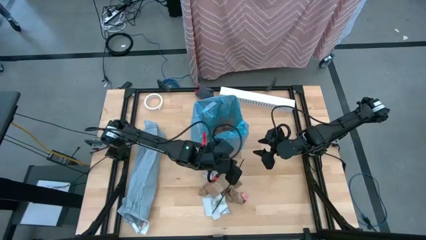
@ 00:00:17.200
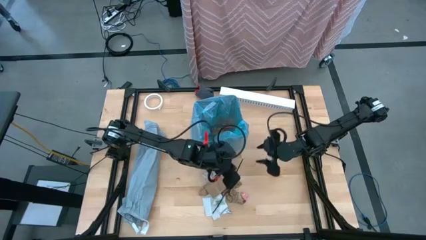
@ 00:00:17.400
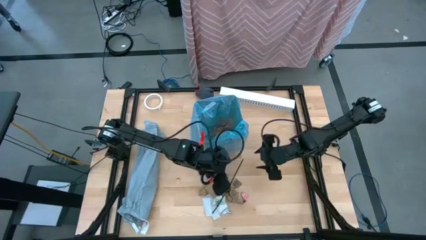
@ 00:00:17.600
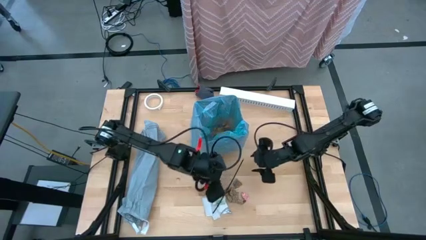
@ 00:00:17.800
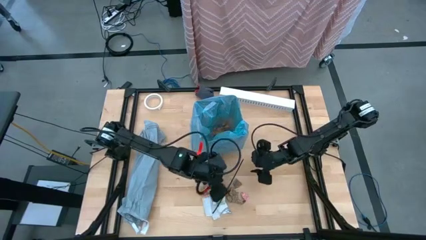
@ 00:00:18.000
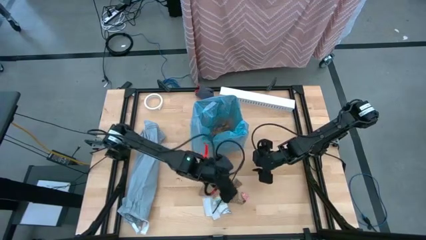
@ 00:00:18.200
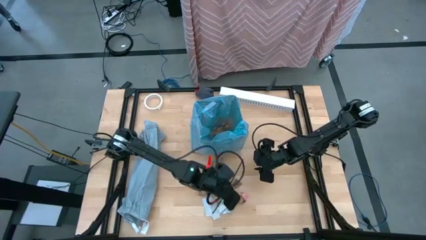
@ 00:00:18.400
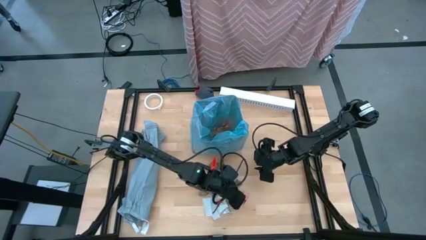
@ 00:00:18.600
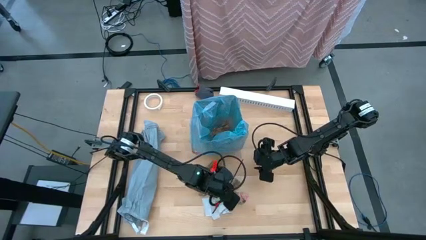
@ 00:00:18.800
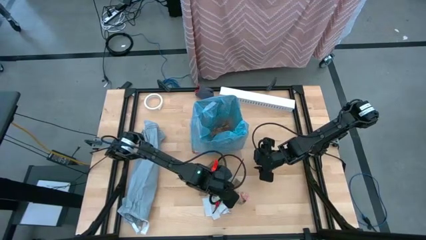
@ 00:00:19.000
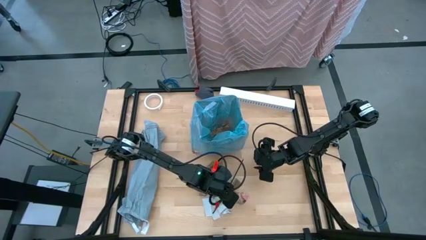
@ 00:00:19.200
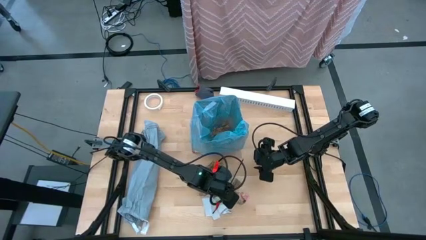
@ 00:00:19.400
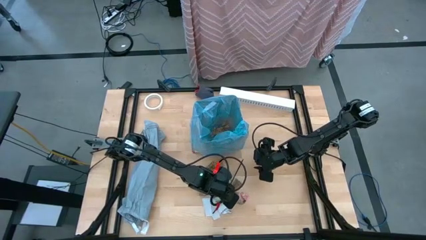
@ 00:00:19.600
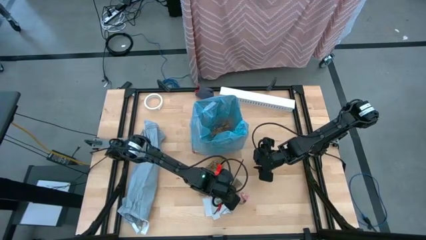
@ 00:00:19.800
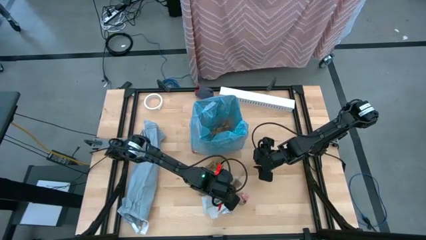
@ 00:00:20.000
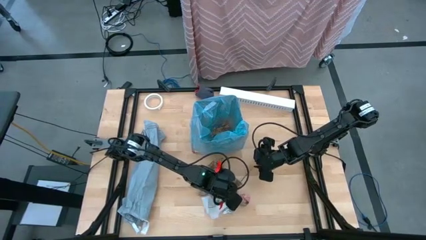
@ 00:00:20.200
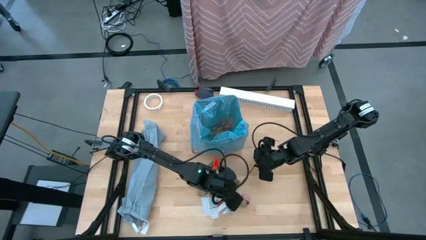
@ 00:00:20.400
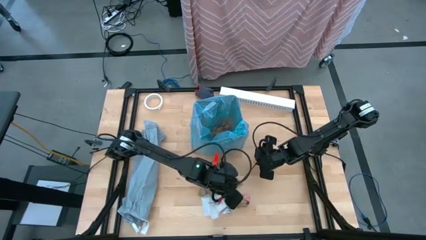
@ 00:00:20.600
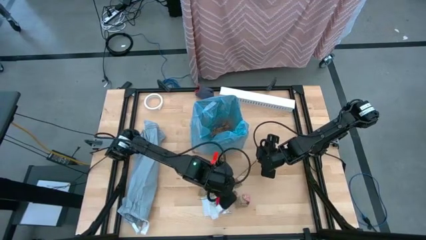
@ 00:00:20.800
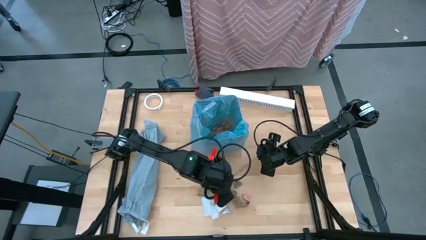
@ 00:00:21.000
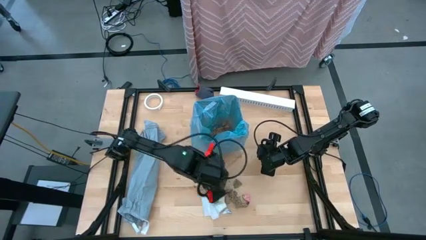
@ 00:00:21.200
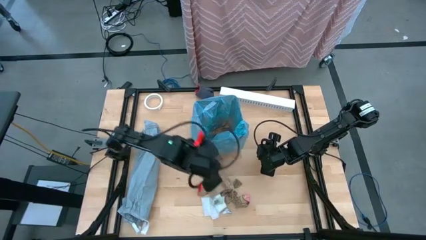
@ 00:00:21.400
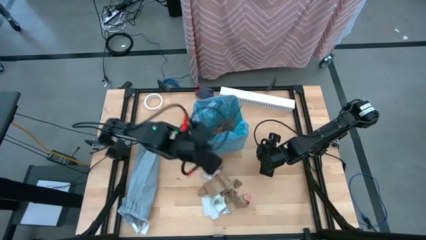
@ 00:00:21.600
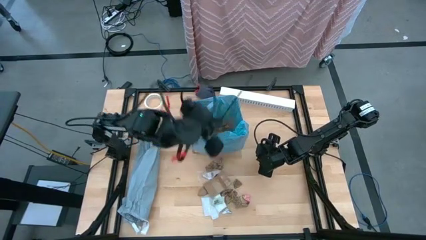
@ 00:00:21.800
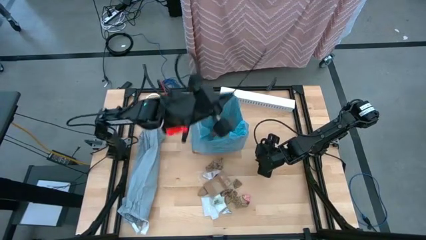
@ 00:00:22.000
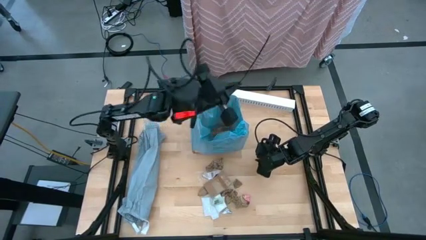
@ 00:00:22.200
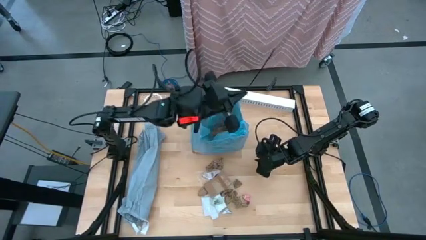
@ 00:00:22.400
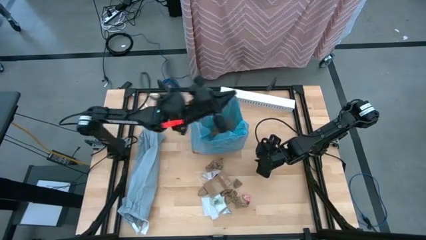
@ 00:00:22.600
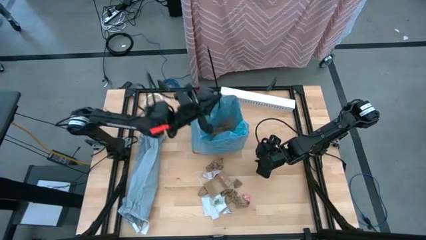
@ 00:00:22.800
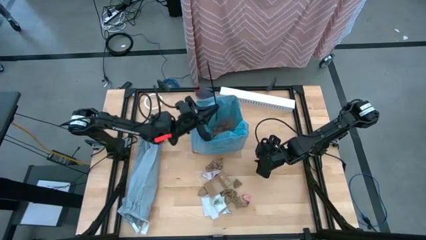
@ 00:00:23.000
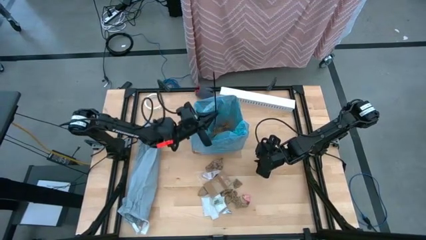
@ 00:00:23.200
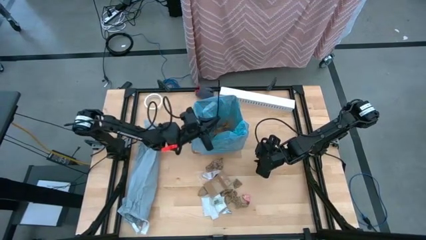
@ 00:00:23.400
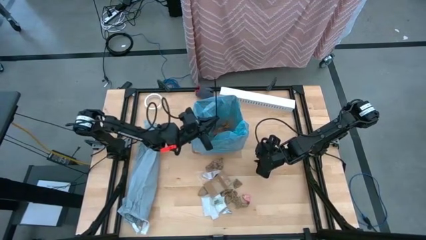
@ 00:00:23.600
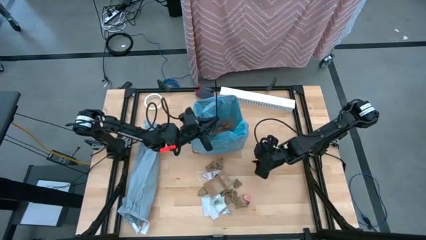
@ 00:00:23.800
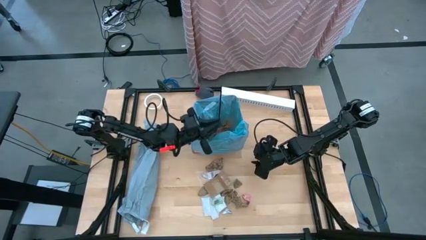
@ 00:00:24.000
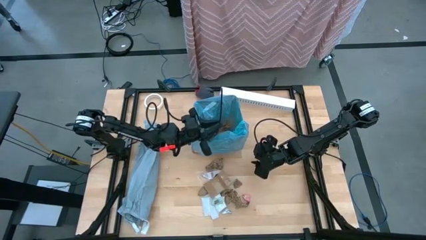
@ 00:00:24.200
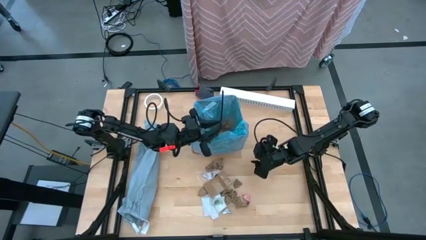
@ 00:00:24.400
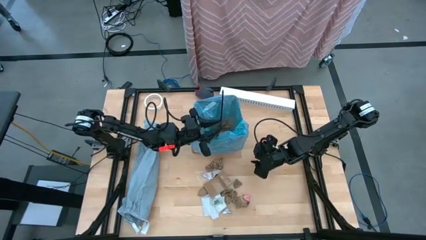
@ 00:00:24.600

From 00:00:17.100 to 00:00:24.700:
Task: place trash/remove bag and relplace
Put the black zip tie into the trash bin

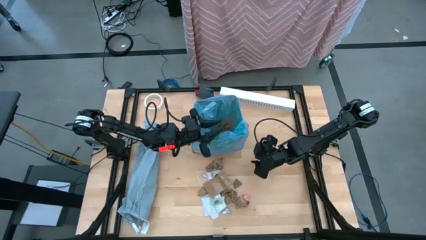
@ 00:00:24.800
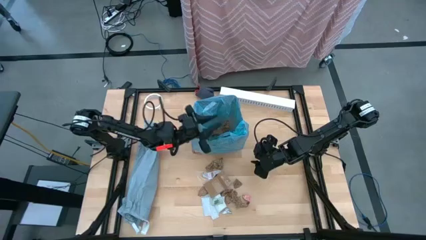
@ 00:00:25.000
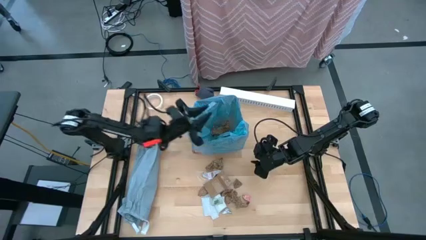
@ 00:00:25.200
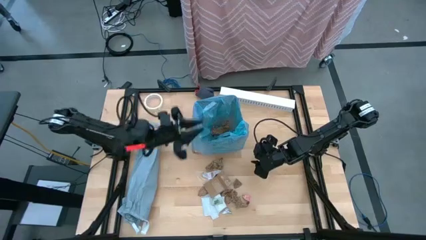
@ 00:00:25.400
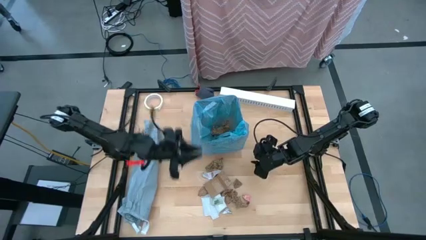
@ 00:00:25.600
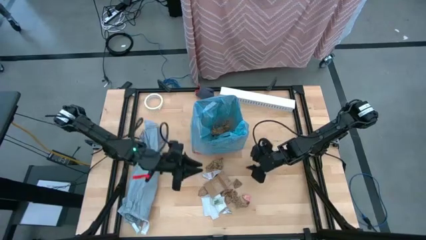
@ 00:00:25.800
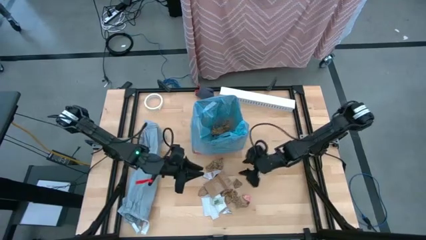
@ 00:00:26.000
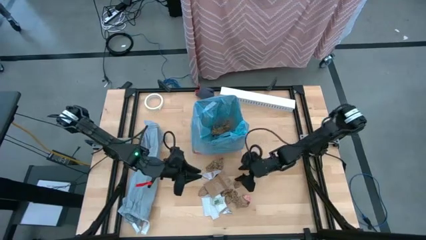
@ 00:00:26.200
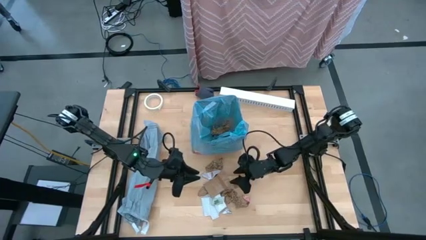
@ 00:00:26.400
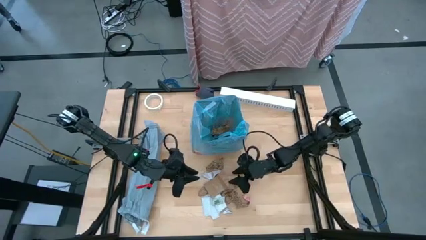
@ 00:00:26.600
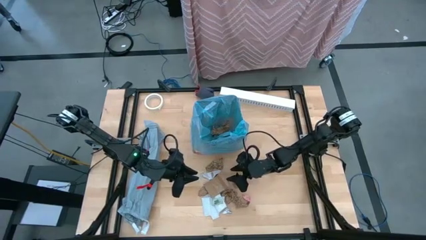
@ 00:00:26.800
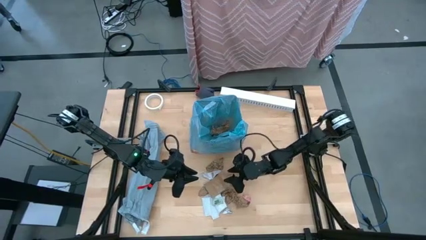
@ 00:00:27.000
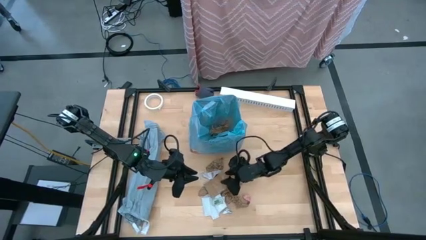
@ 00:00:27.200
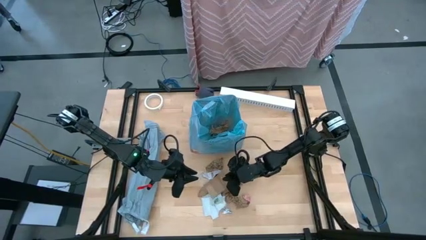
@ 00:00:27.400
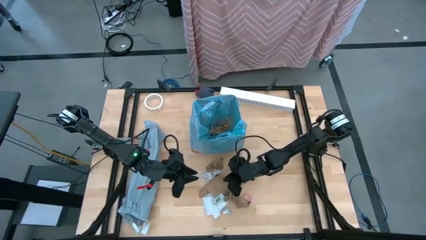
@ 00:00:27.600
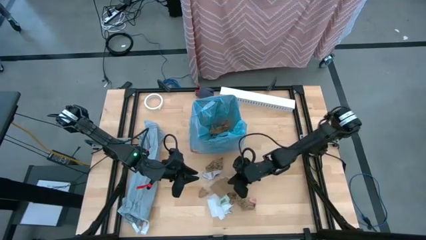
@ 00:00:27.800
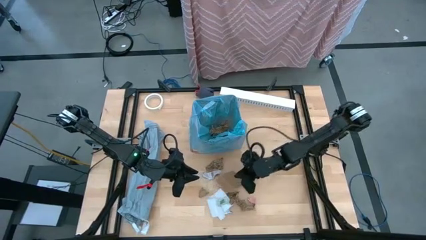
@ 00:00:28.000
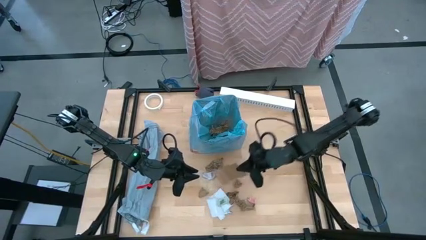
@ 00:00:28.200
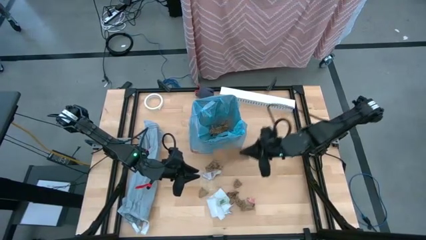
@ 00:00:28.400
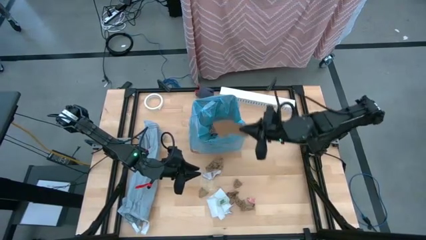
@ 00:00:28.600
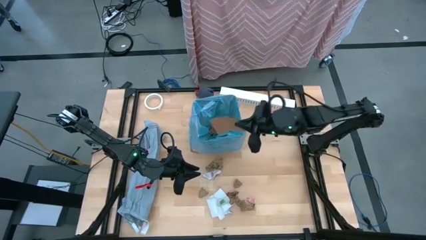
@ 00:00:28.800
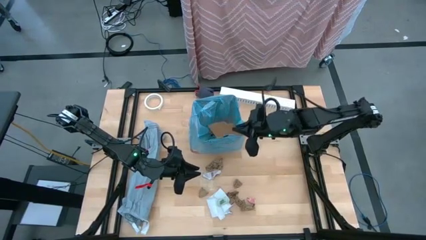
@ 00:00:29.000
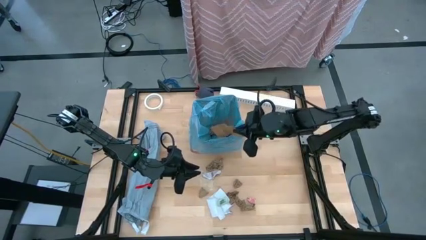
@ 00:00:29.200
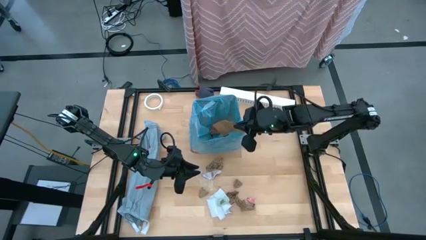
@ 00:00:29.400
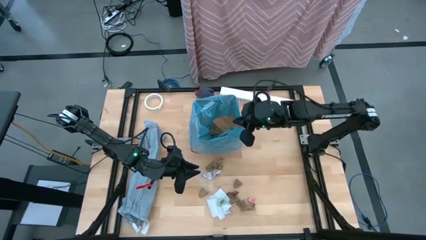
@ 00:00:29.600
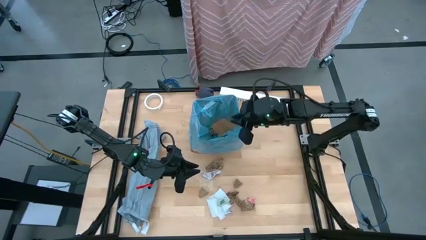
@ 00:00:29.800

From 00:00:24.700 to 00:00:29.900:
Put the brown cardboard into the trash bin

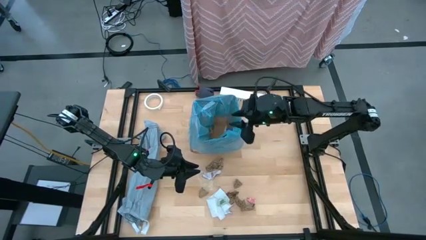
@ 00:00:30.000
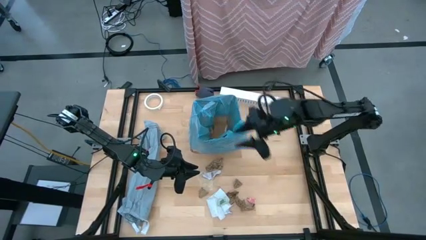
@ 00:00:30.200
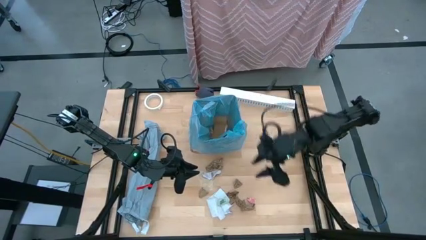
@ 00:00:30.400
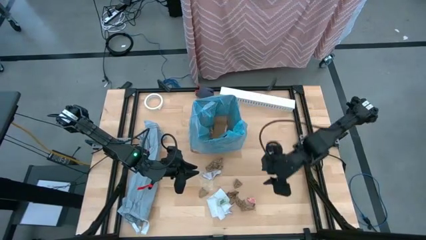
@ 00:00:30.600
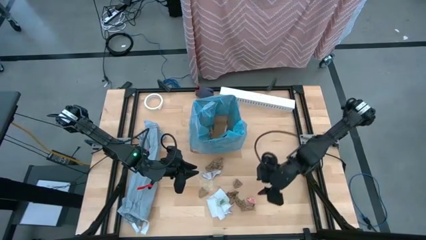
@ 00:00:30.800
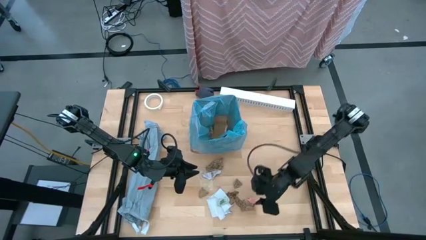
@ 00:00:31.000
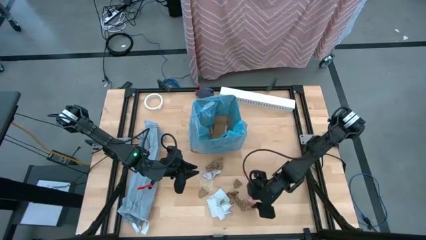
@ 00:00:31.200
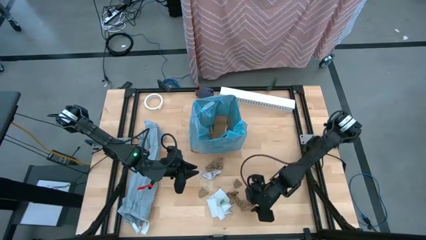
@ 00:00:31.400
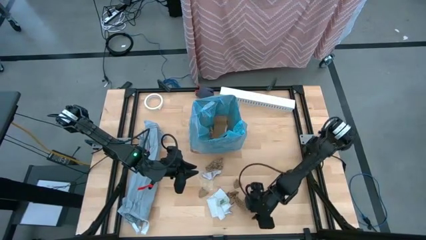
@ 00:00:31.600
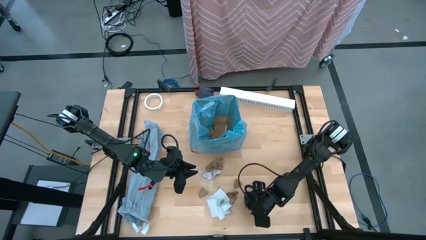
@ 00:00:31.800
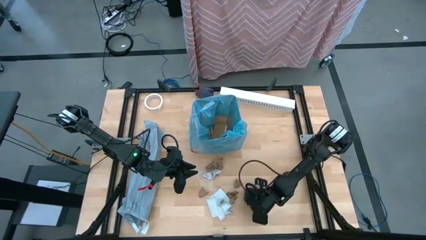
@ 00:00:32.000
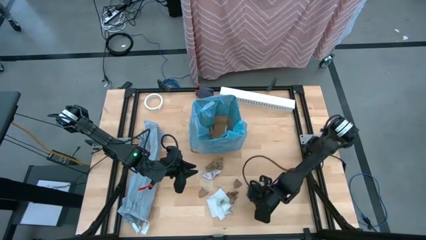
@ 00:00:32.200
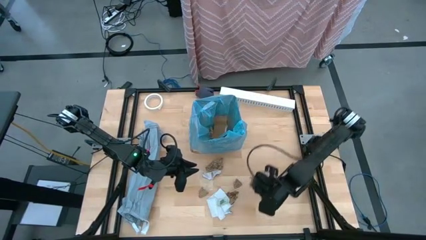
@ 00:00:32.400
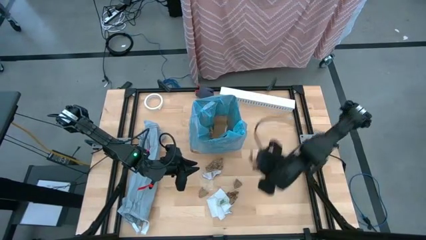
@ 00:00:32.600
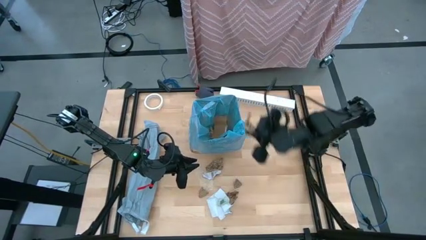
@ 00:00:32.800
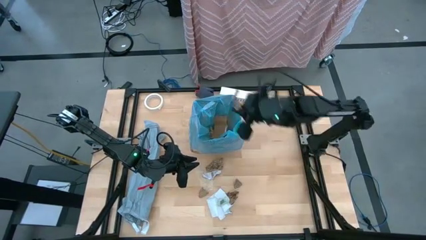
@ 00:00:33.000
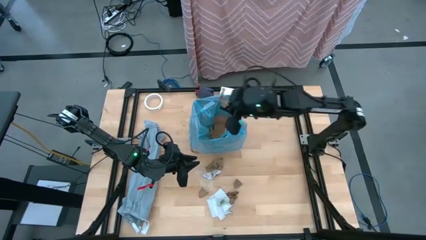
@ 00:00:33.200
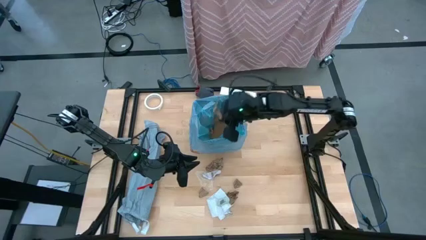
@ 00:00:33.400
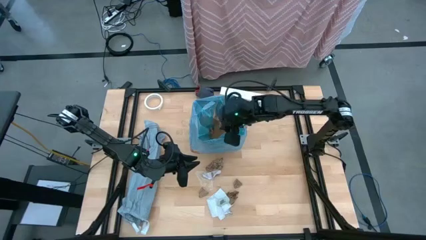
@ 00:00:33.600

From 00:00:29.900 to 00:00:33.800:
Put the brown napkin into the trash bin
